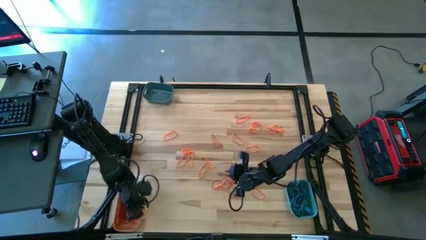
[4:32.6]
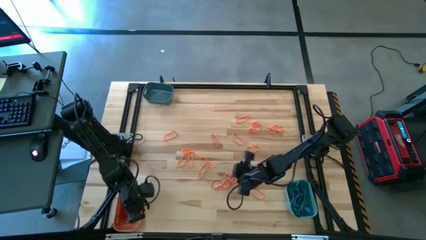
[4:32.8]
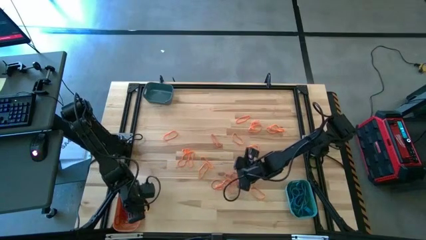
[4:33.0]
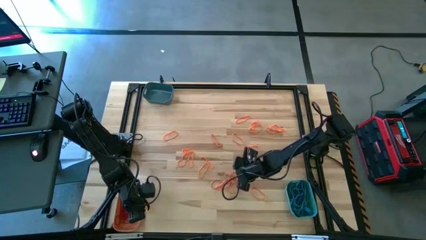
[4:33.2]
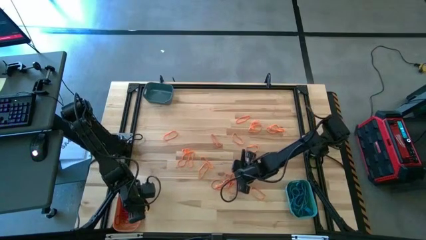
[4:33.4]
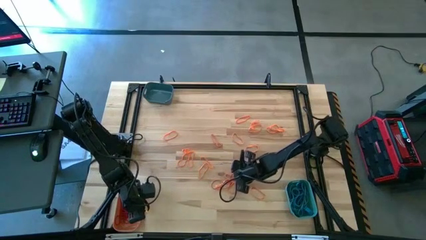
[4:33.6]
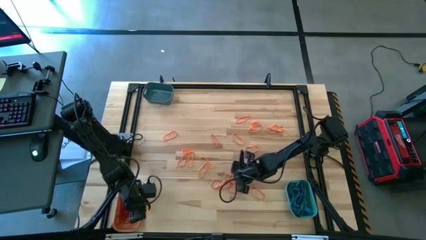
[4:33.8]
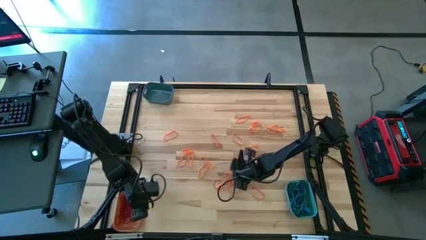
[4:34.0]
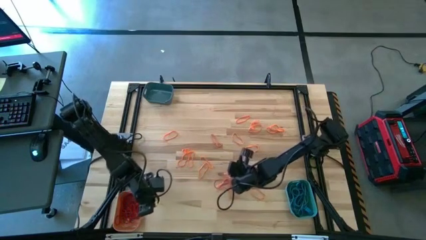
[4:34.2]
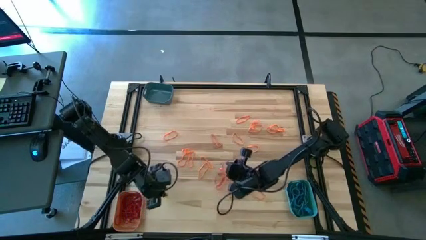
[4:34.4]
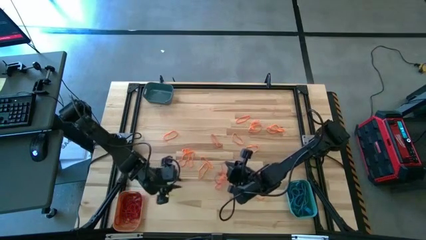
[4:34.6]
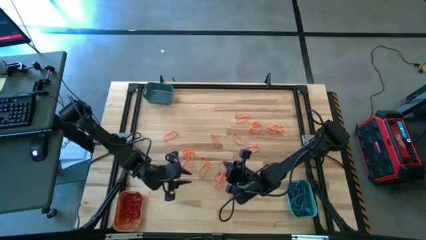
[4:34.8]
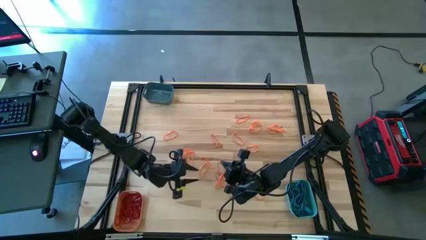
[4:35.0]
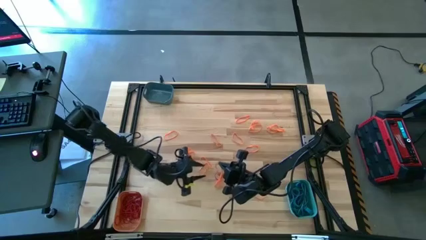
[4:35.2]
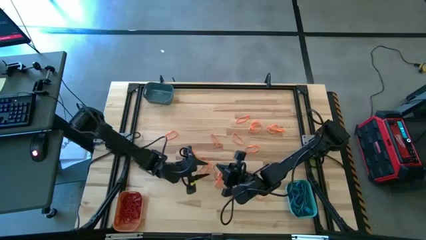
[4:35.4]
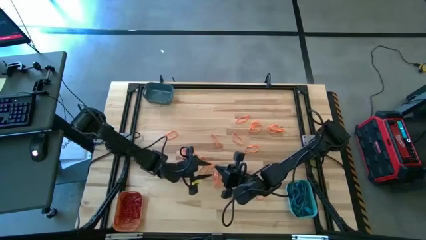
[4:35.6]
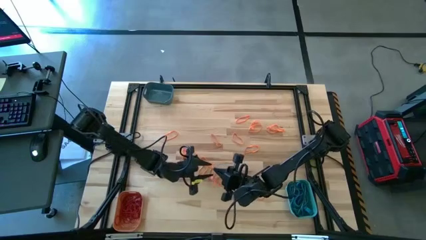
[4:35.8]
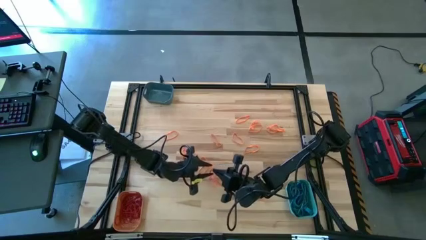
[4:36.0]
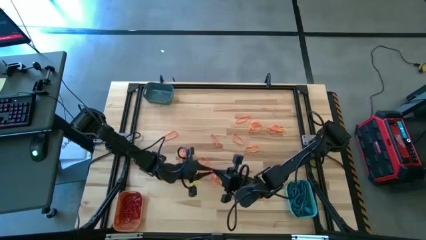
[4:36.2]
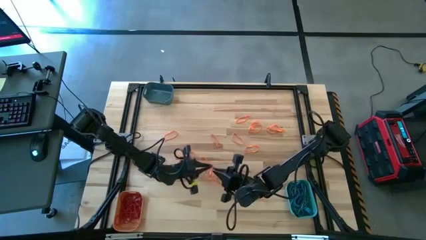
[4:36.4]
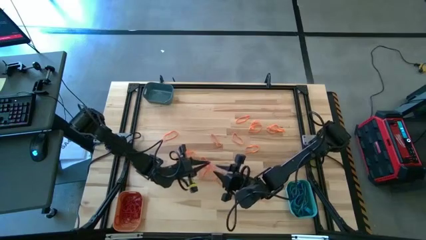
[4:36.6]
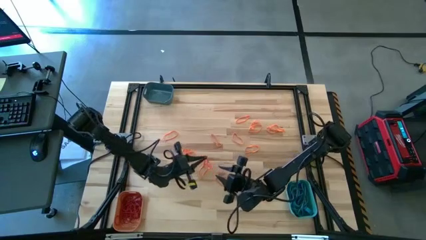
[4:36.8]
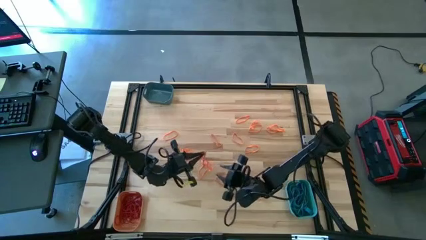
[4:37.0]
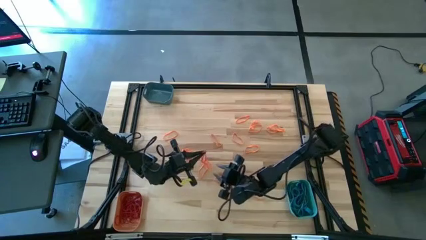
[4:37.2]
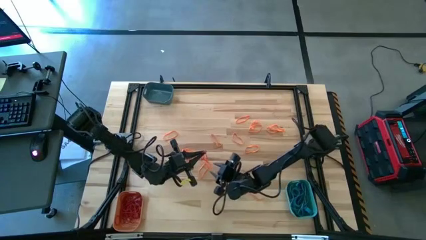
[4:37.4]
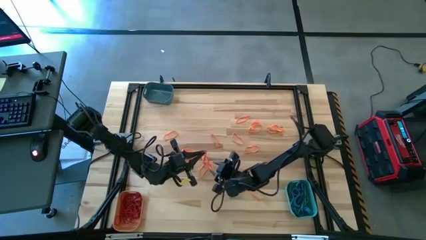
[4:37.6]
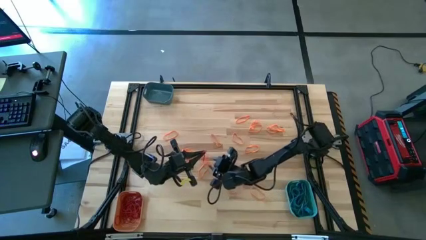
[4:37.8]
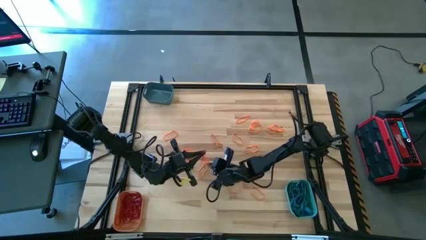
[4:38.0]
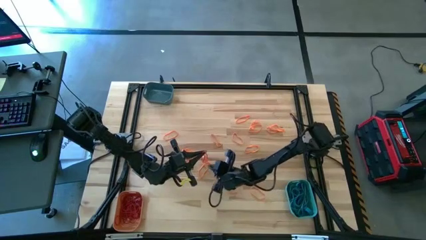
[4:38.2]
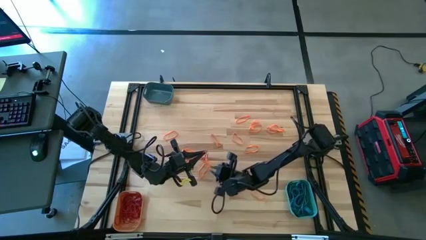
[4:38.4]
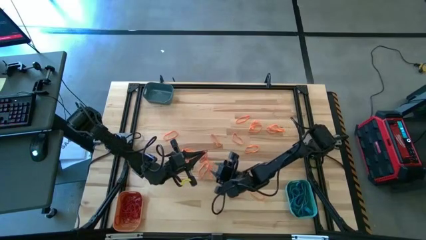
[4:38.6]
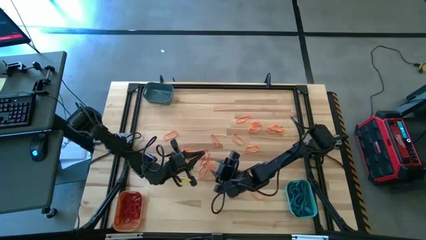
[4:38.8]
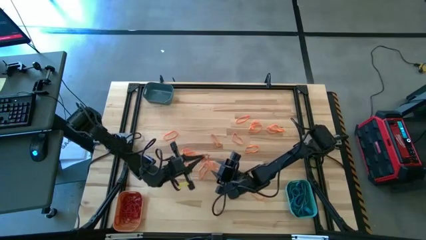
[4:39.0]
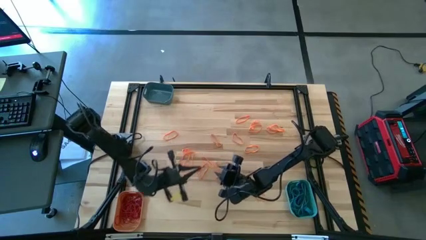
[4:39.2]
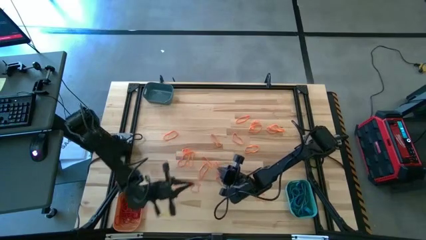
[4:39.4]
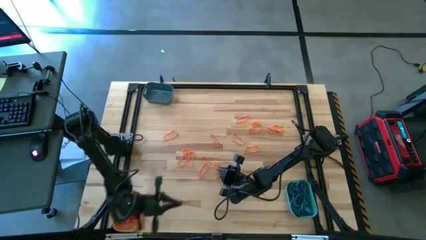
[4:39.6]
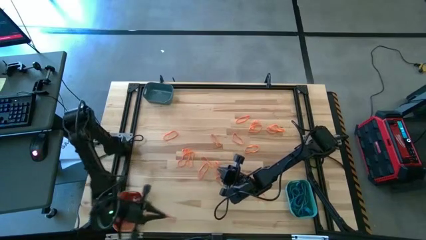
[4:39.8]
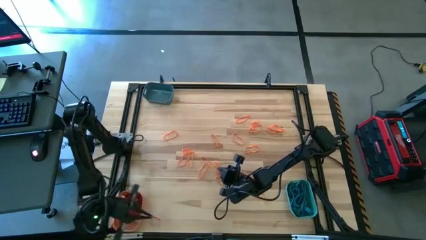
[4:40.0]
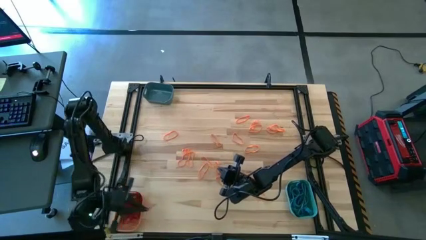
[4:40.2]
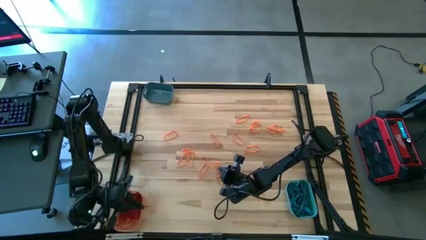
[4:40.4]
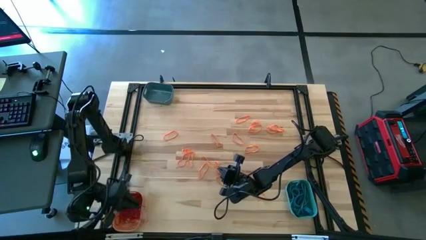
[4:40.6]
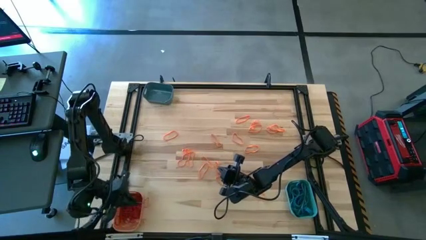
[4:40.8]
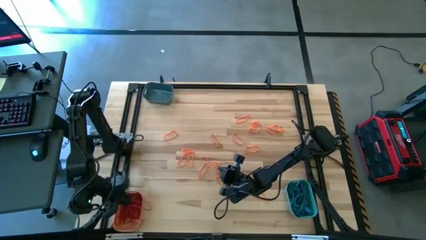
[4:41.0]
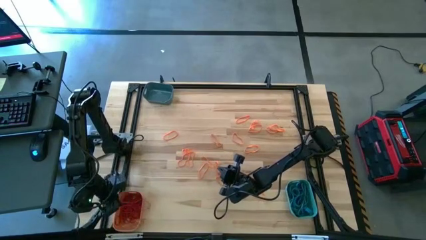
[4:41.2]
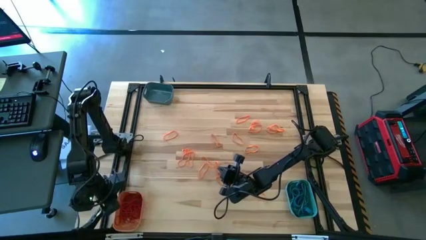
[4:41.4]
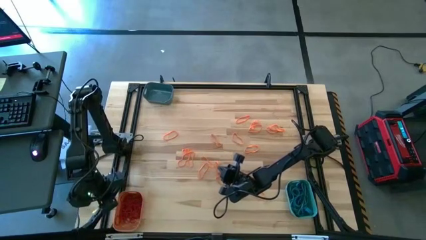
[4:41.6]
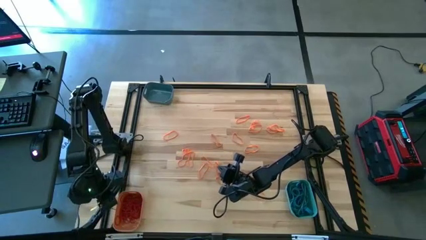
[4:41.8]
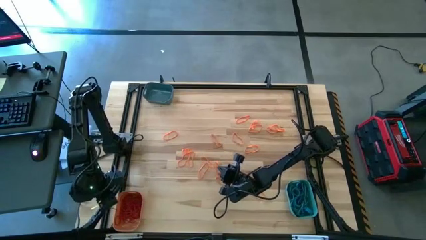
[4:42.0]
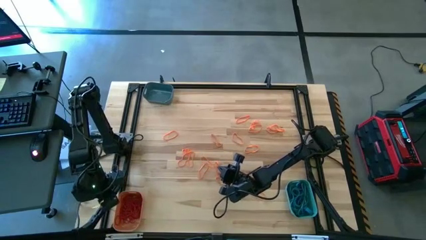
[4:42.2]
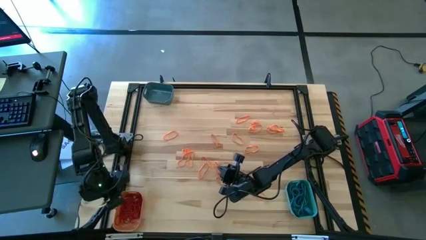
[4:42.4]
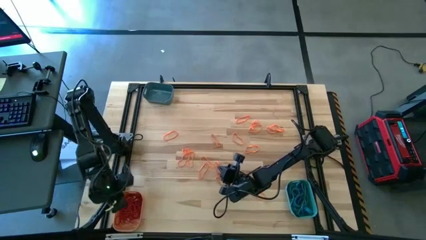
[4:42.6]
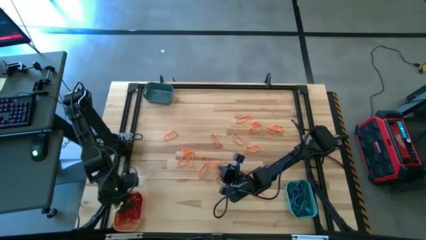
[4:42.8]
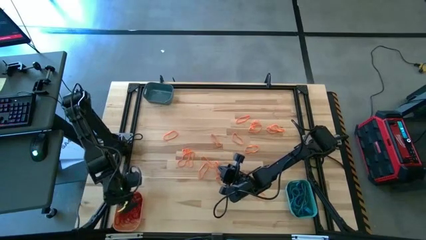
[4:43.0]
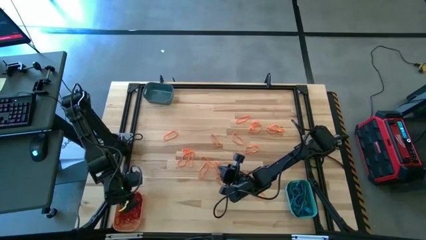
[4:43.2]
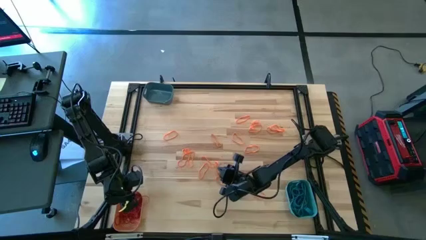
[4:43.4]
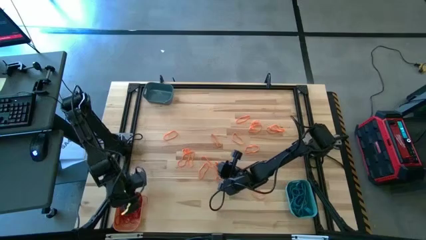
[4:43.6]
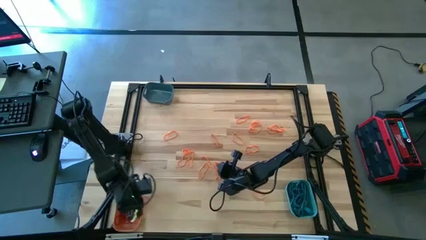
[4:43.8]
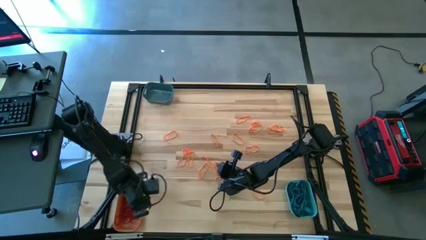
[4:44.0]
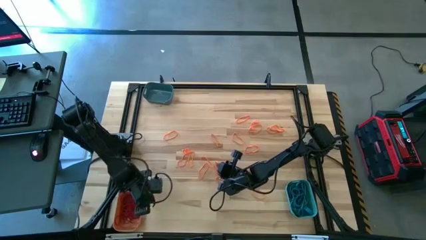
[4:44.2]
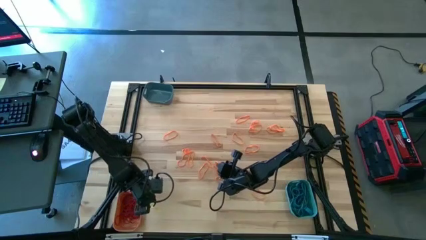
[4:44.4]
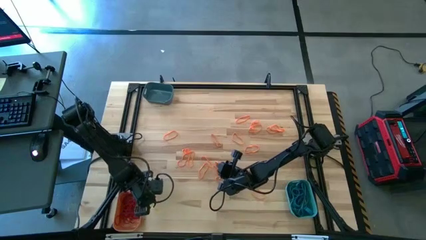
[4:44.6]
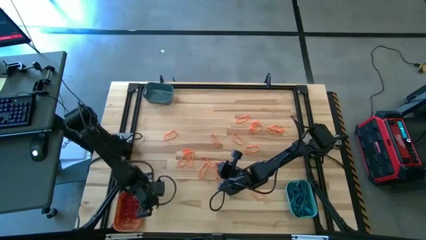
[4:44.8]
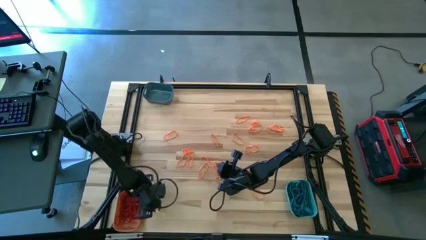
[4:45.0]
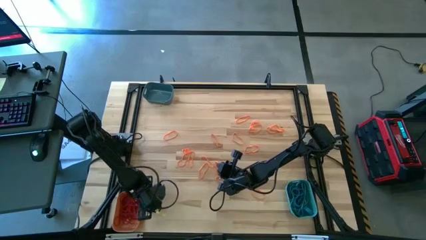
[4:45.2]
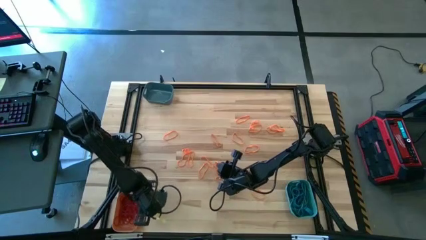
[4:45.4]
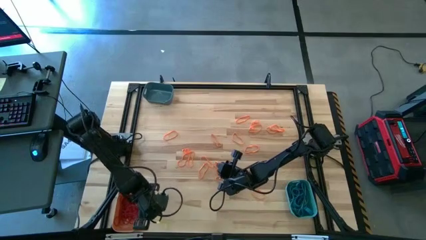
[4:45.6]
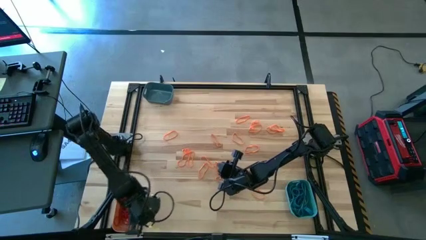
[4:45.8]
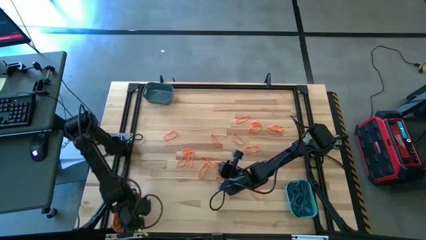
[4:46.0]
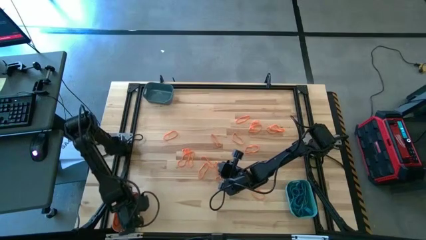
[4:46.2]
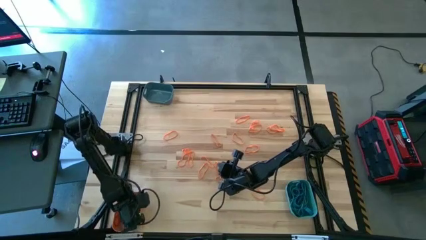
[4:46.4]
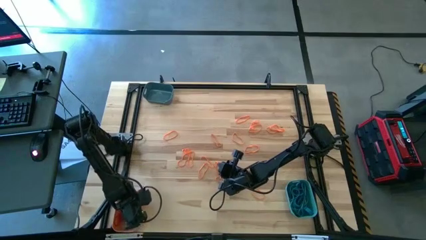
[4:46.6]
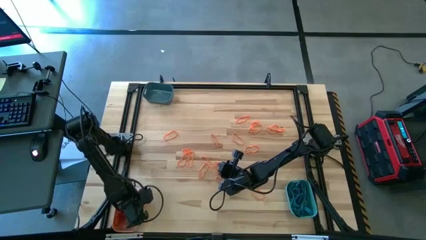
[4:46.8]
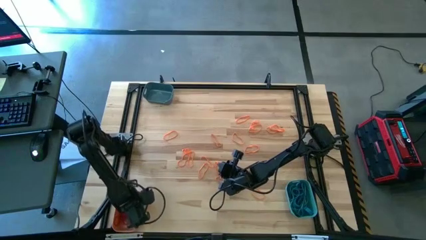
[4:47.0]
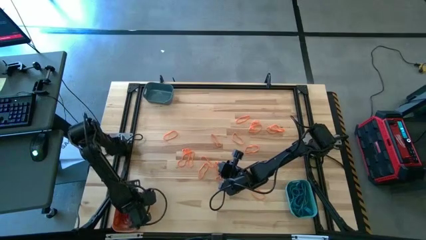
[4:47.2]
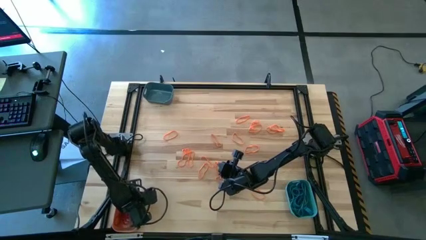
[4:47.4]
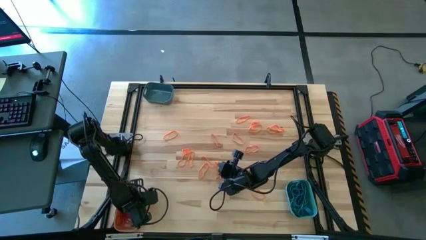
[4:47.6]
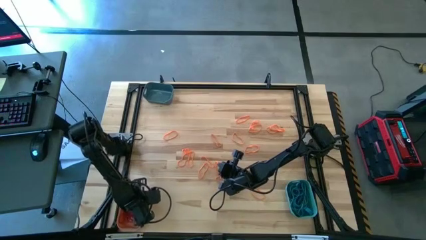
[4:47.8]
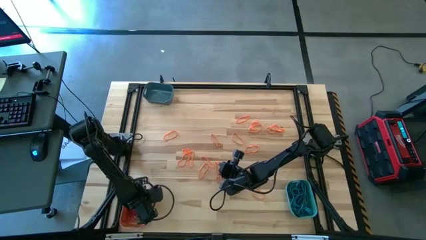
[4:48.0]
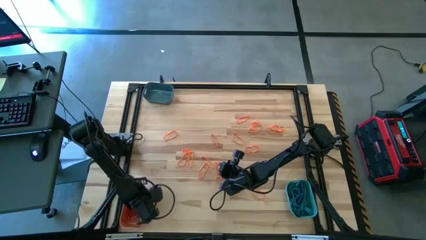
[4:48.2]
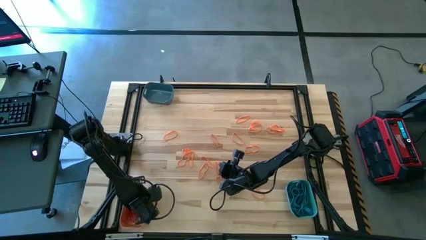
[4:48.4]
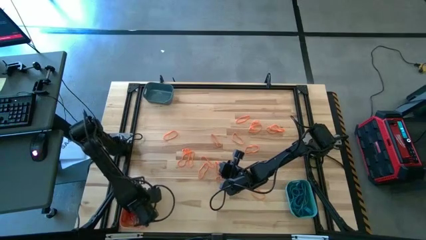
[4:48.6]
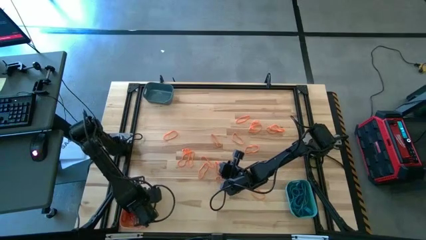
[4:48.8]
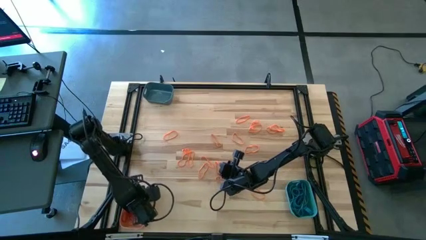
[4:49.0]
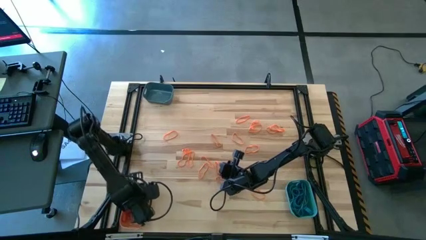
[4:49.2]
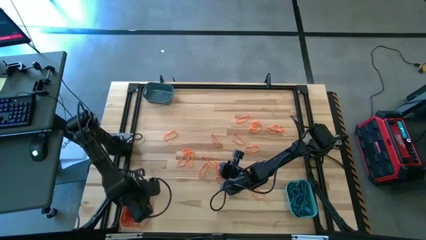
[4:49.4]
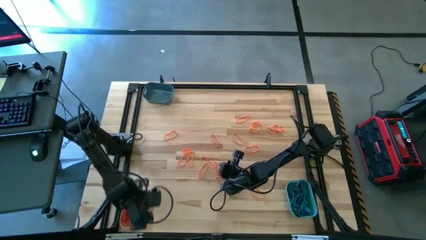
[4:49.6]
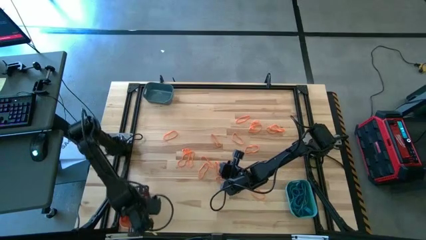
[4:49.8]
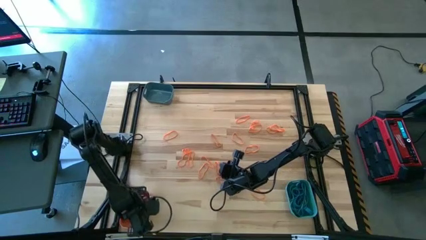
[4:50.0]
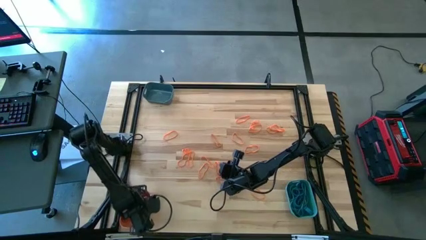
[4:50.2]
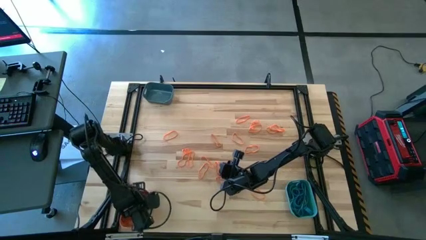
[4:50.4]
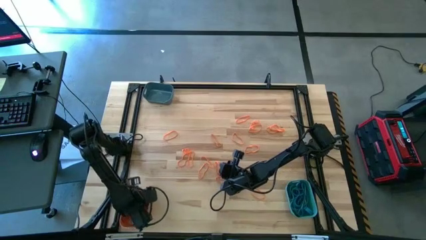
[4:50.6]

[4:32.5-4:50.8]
Task: Sort rubber bands into baskets
Put the red rubber band into the orange bin
